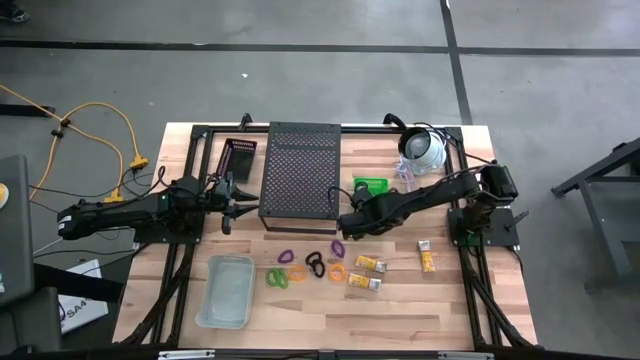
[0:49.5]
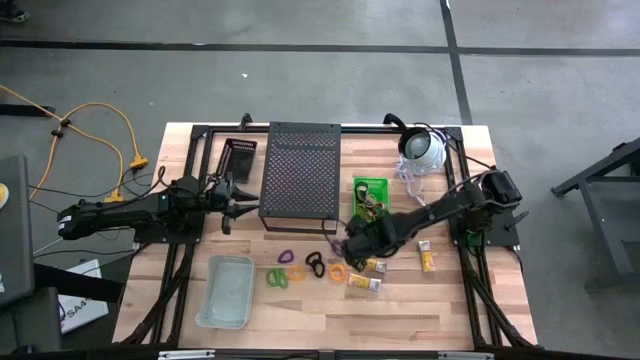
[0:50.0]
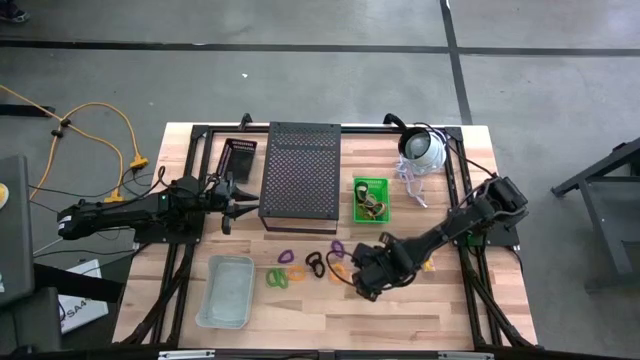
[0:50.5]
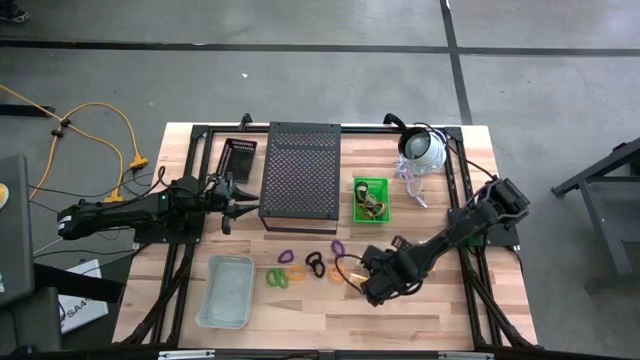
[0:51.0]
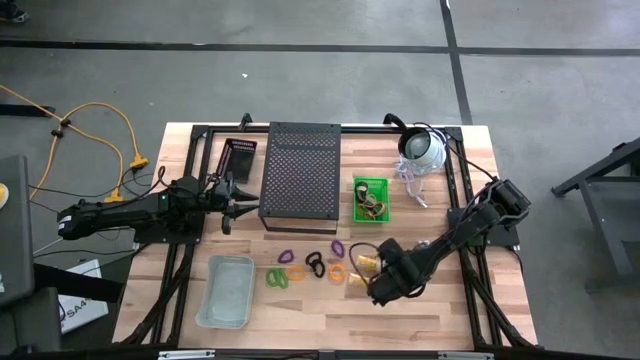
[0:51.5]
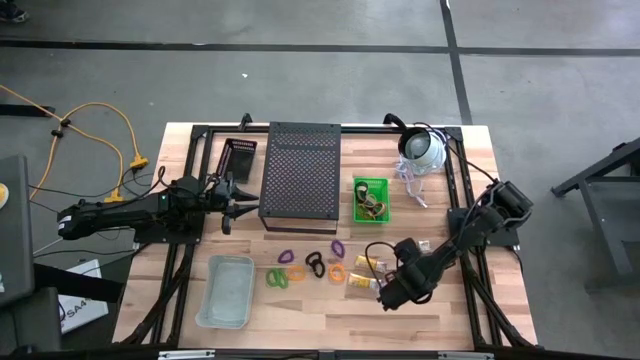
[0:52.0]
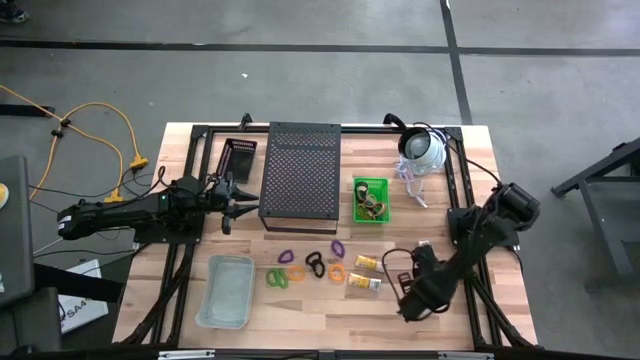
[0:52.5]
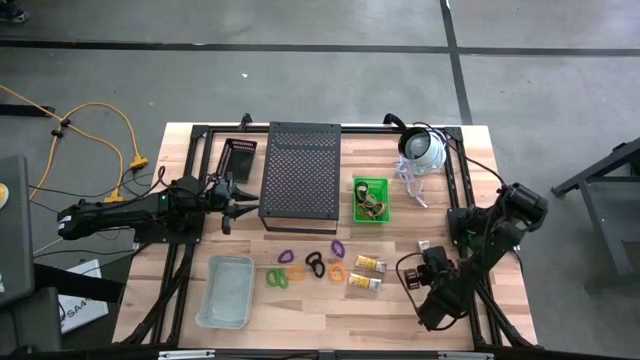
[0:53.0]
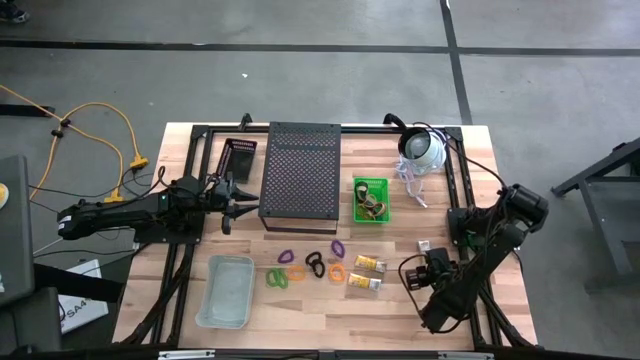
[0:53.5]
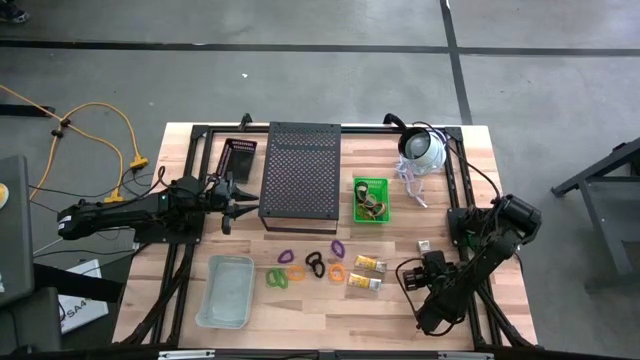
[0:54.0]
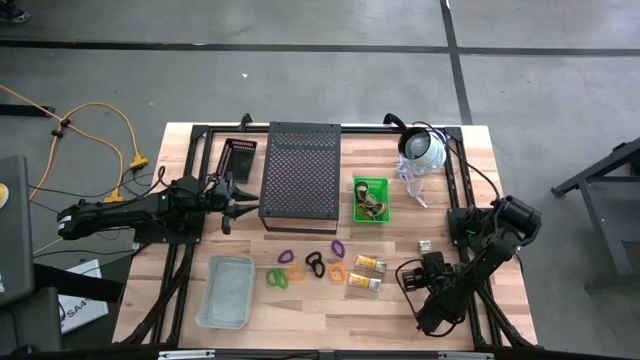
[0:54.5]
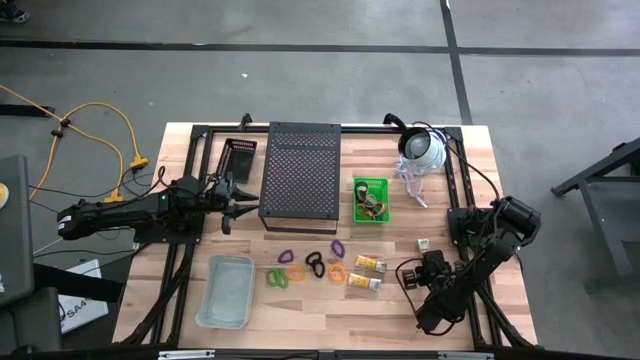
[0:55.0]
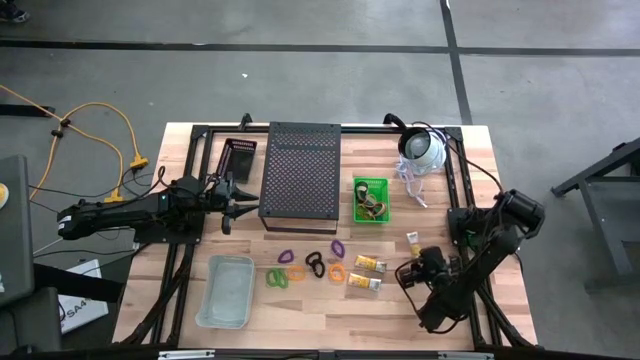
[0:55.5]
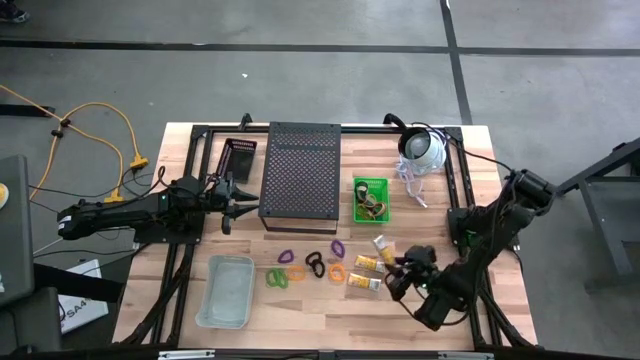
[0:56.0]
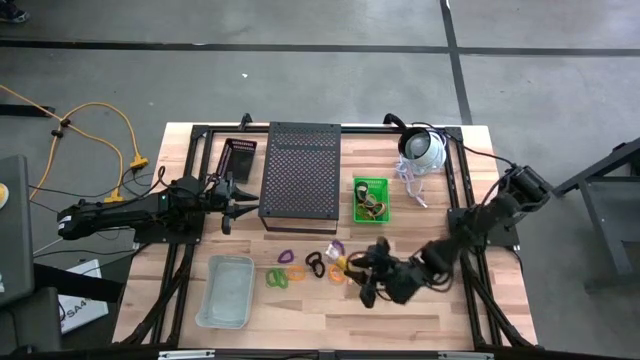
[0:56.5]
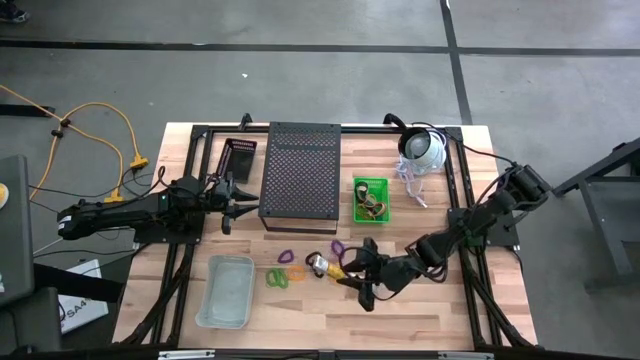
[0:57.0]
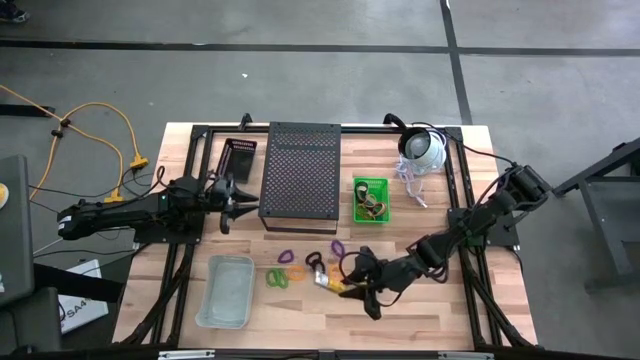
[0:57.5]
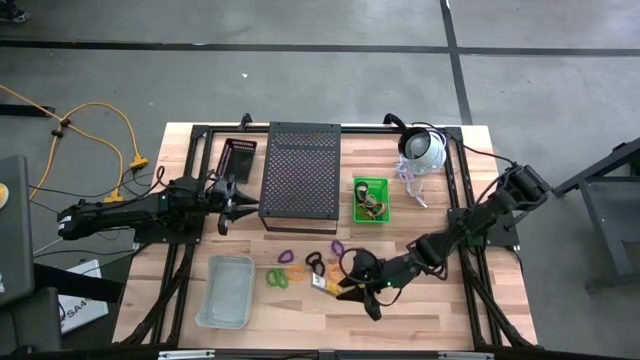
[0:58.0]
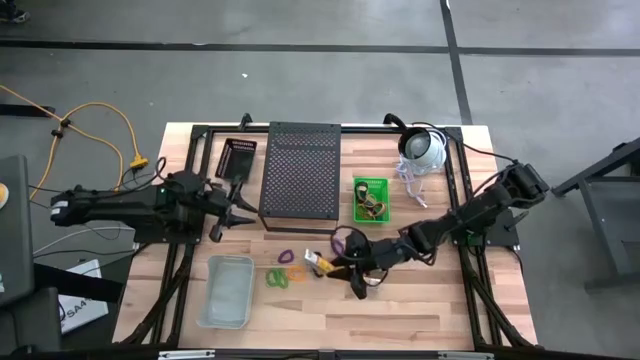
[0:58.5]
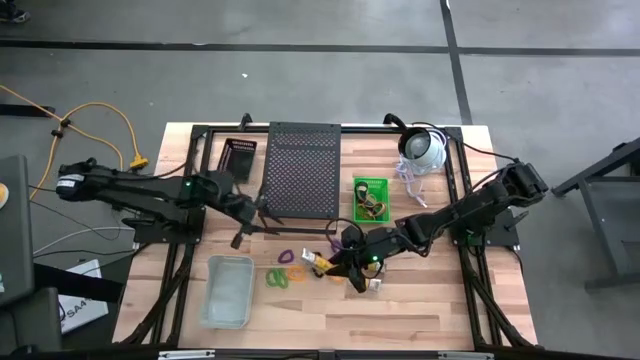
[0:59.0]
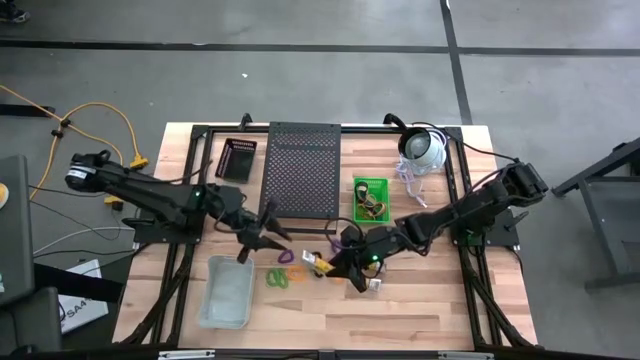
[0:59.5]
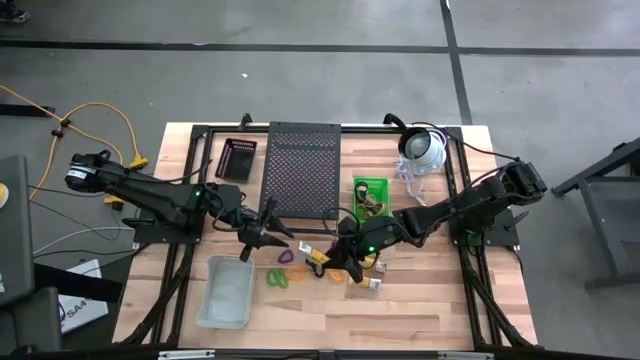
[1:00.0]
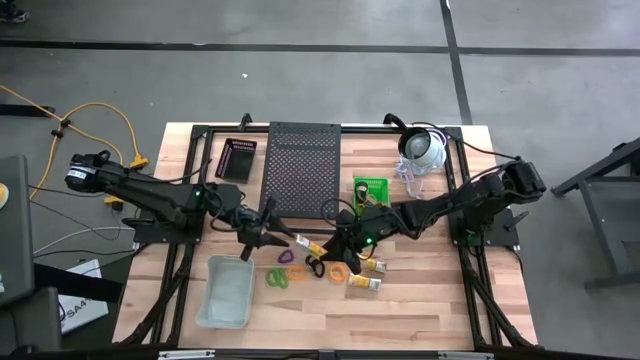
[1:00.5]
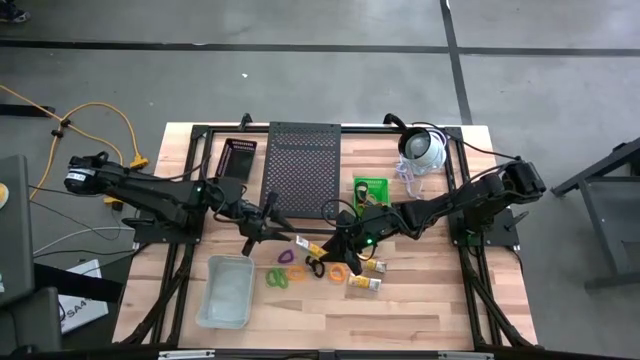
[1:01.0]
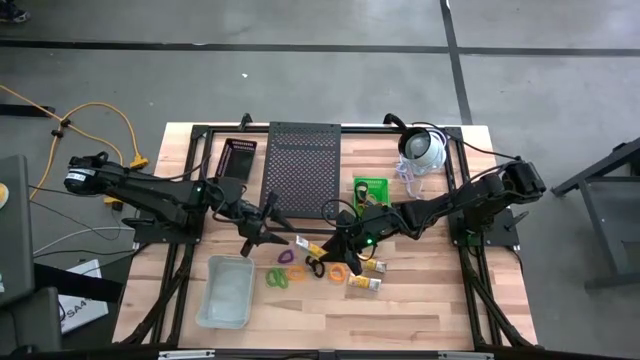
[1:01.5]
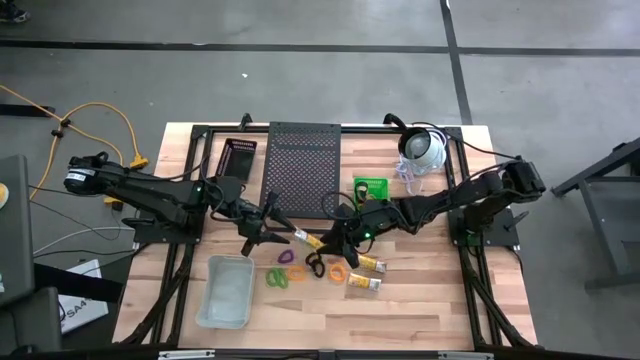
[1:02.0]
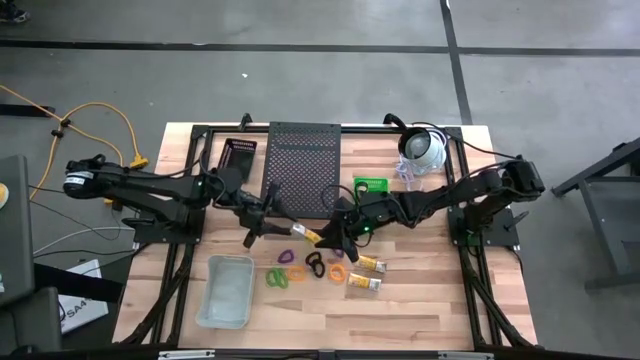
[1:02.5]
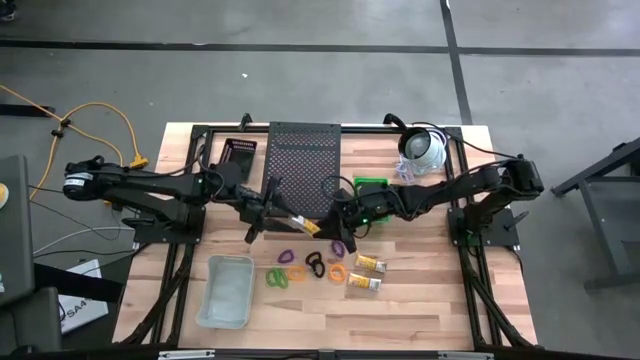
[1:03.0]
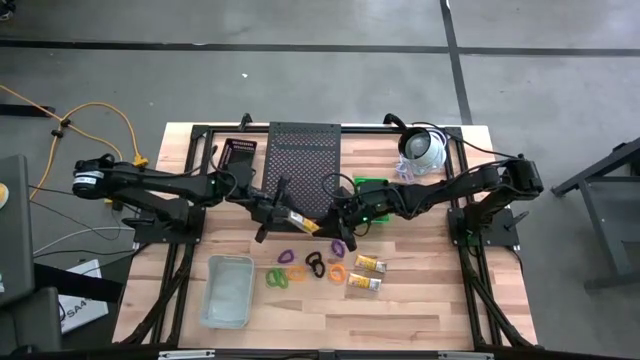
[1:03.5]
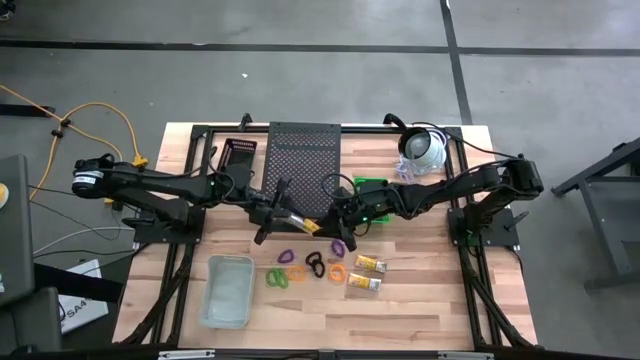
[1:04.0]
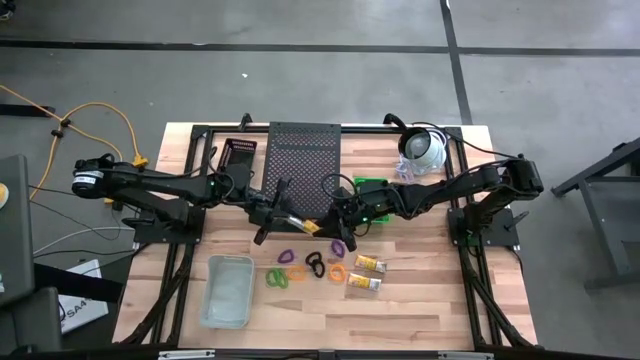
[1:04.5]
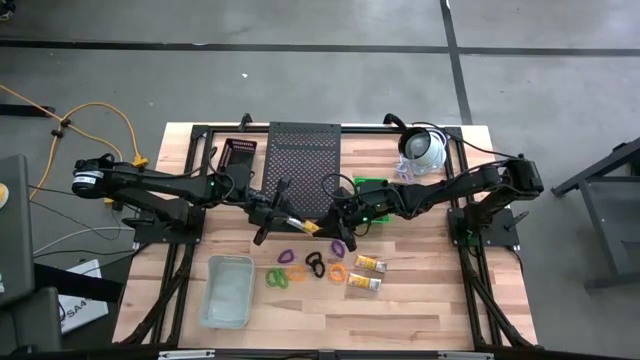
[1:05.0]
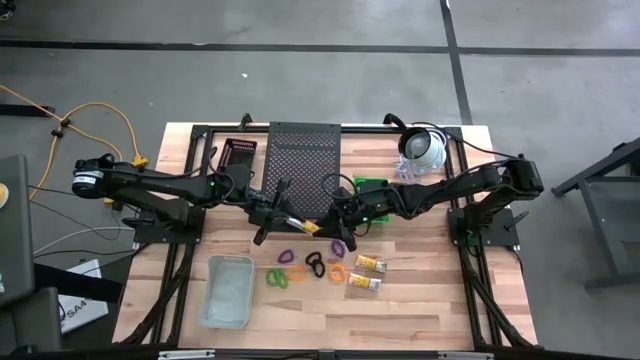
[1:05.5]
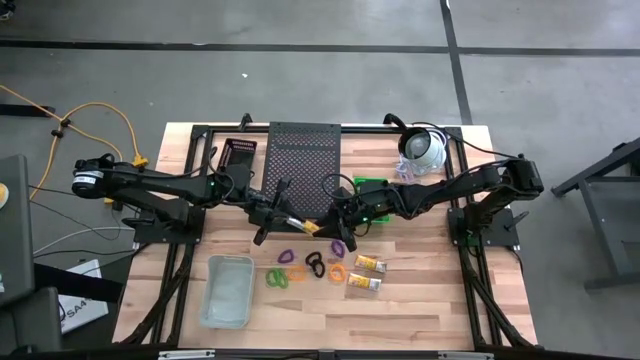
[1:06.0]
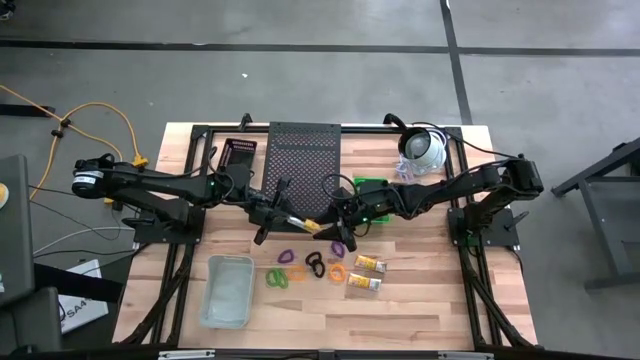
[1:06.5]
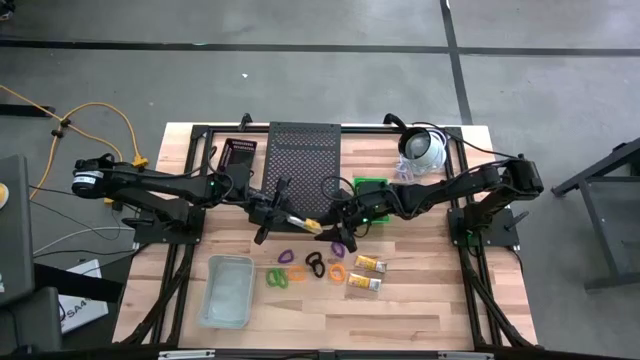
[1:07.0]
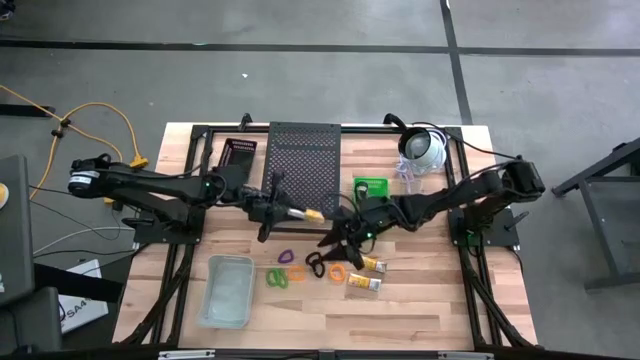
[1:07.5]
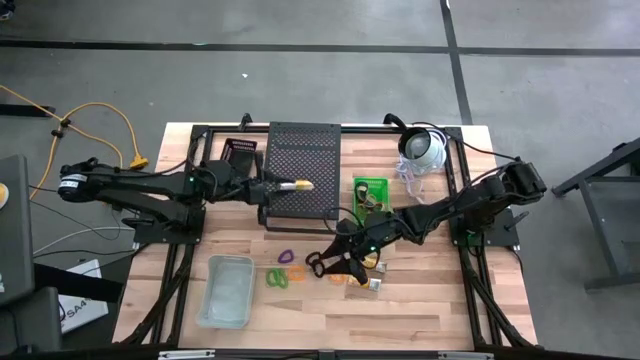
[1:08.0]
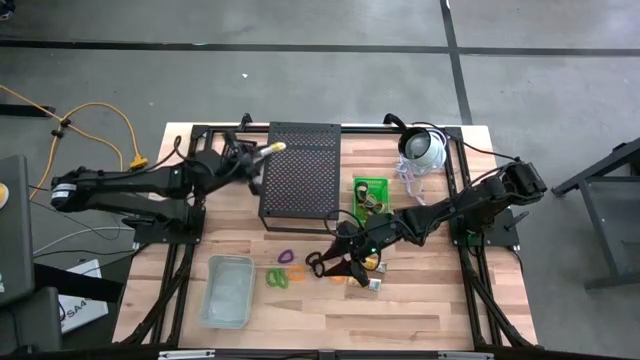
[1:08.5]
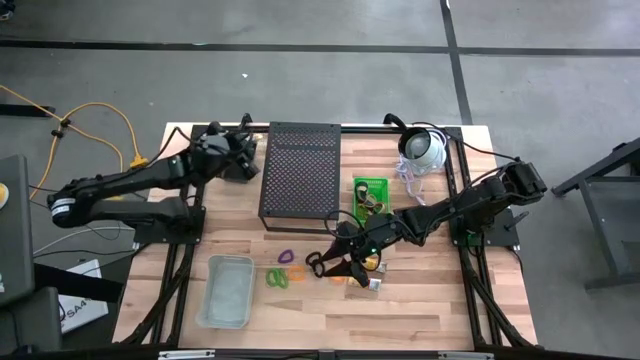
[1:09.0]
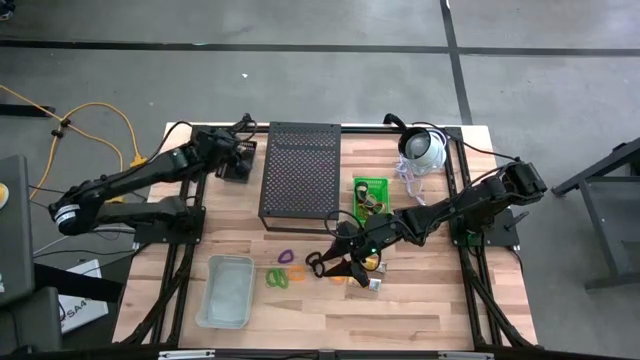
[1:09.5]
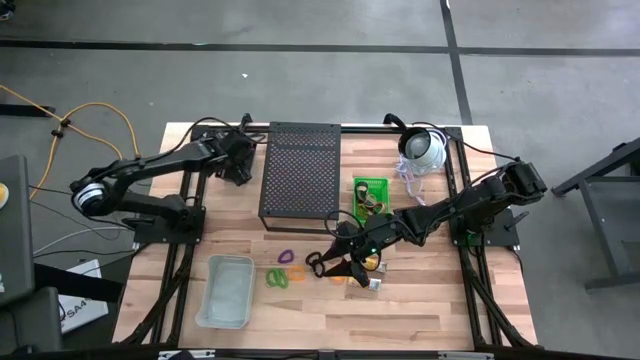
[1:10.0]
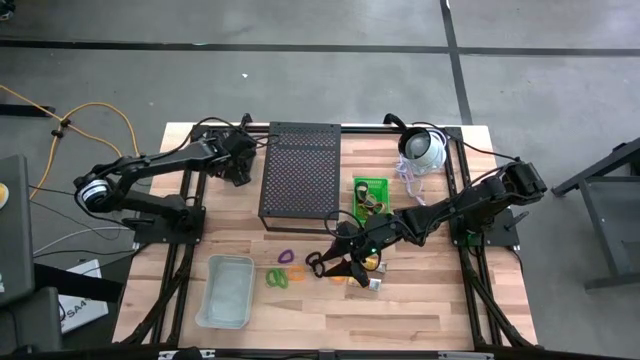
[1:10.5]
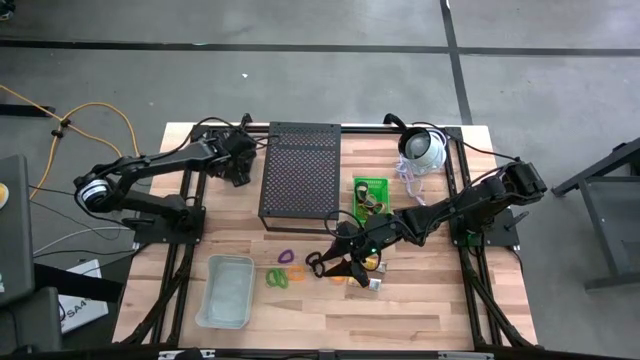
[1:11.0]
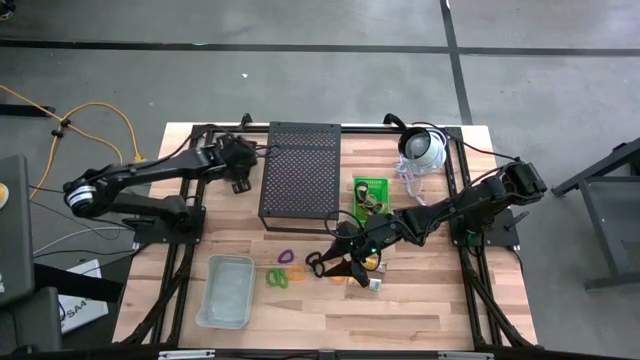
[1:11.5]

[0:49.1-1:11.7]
Task: Pick & Place Office Desk Supplies
Put the top right crayon box into the black basket
